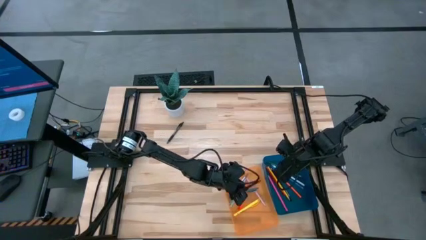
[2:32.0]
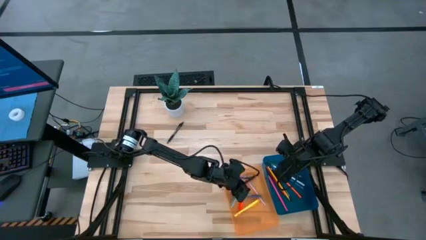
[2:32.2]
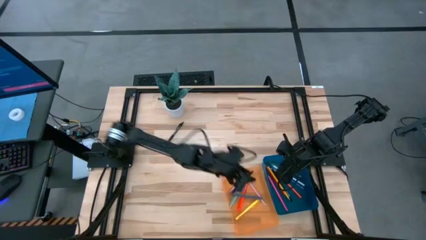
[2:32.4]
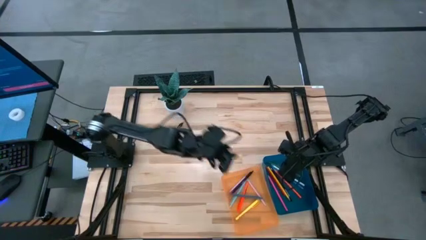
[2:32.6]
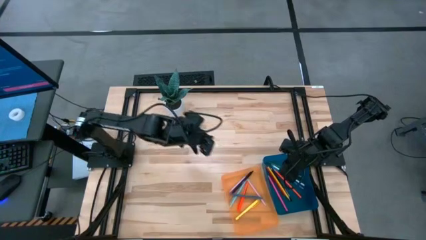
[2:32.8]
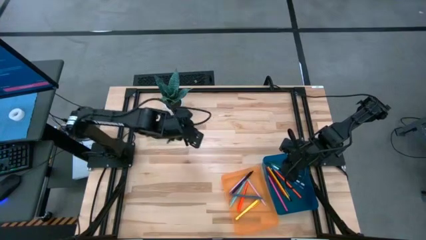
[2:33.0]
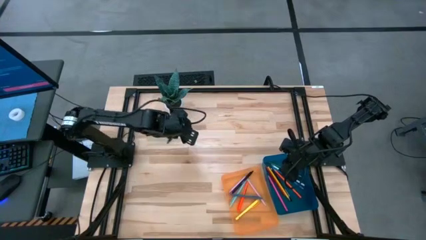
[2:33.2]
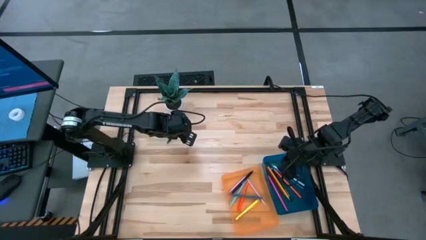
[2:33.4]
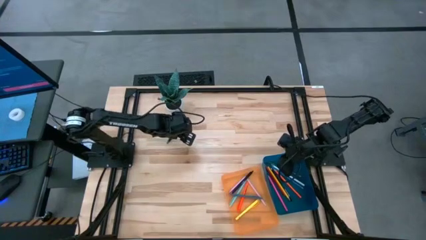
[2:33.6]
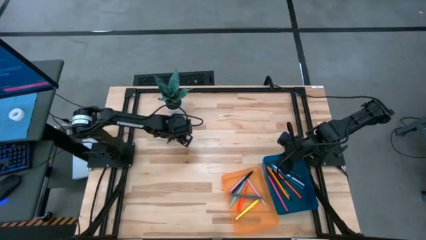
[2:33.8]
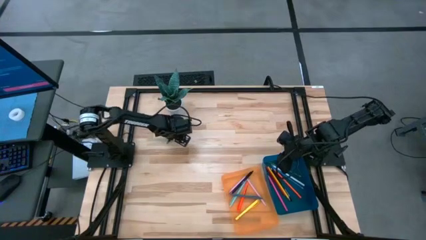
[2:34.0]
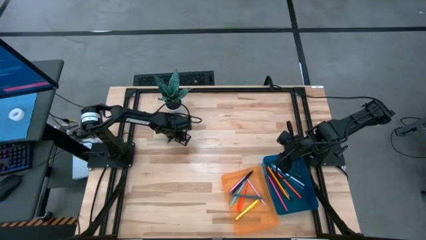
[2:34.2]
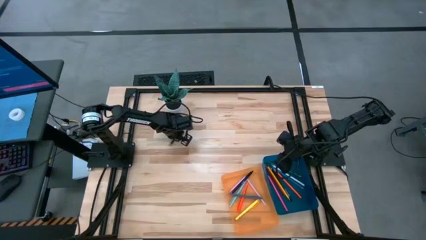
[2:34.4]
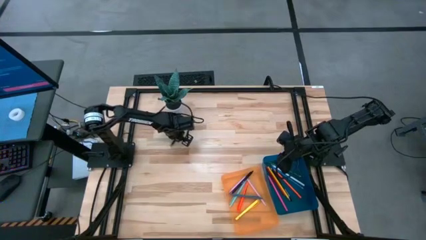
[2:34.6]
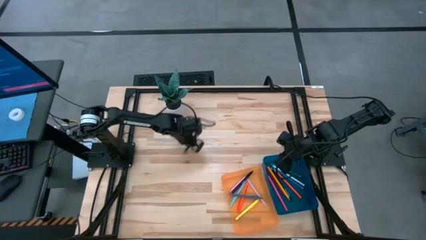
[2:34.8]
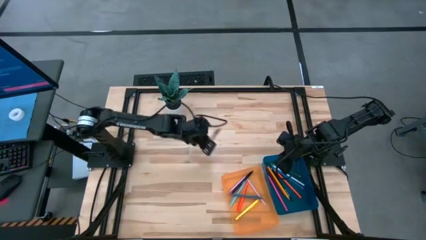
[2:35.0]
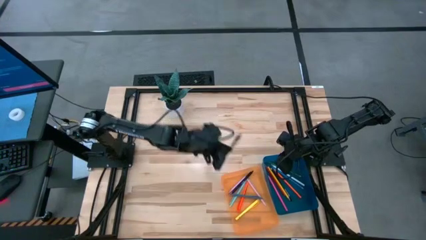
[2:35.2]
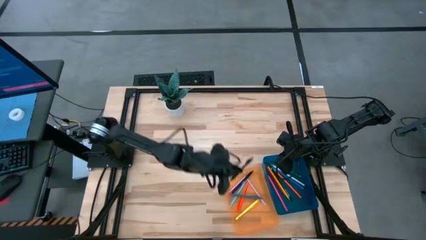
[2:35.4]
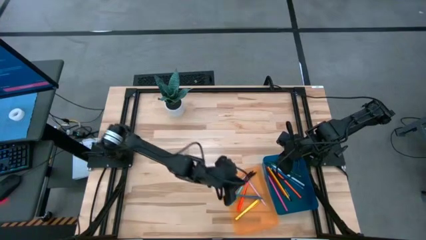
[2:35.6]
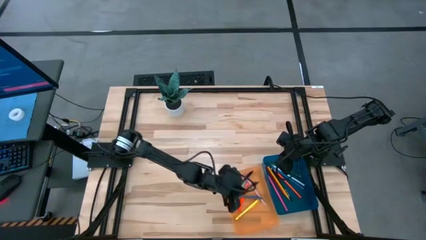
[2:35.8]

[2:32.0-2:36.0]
Task: Sort pens & pencils
Put the transparent black pen into the orange bin

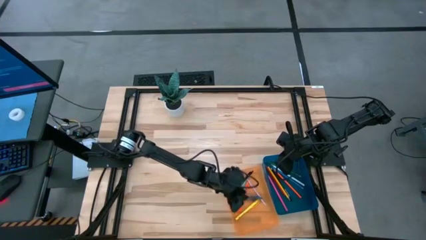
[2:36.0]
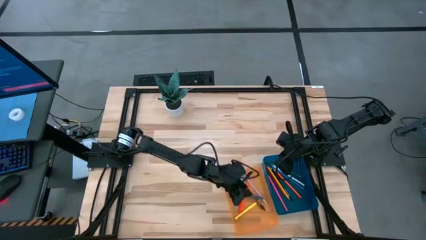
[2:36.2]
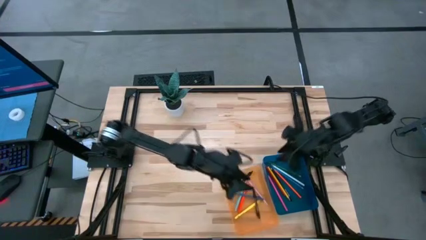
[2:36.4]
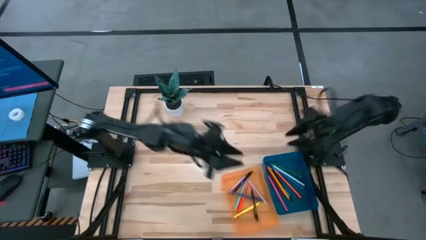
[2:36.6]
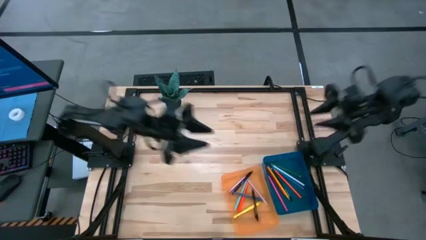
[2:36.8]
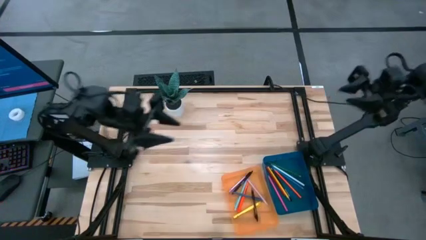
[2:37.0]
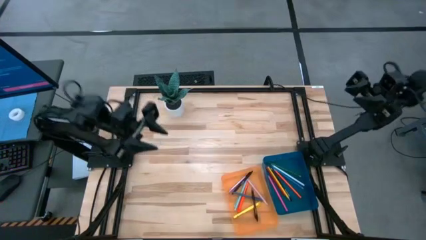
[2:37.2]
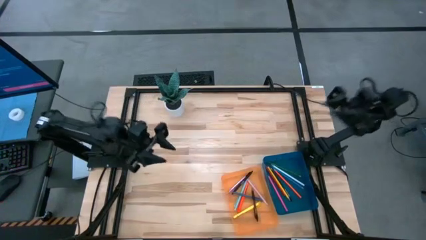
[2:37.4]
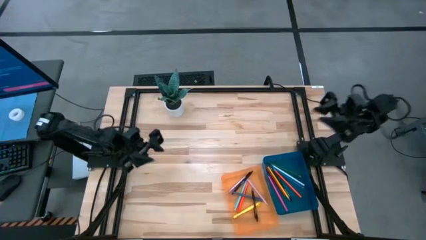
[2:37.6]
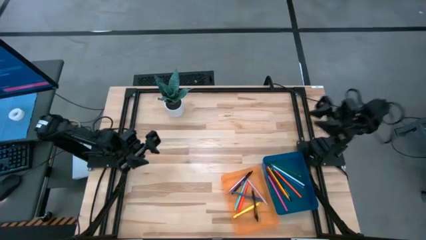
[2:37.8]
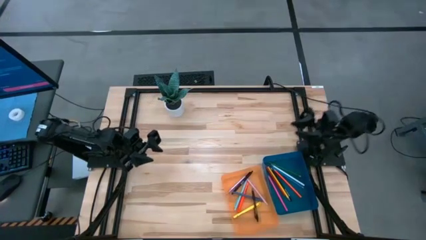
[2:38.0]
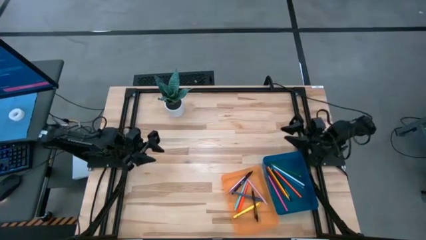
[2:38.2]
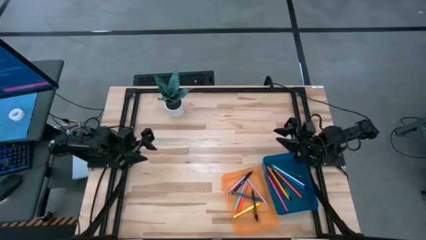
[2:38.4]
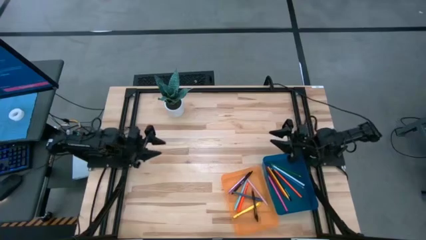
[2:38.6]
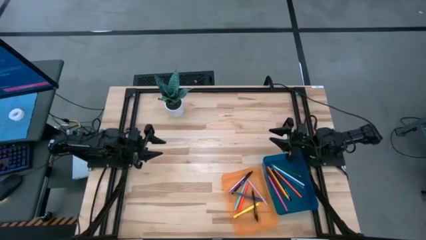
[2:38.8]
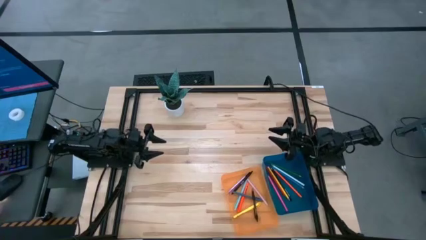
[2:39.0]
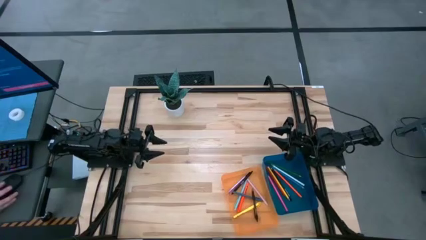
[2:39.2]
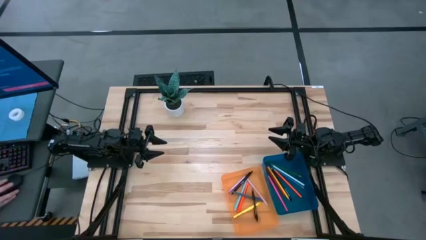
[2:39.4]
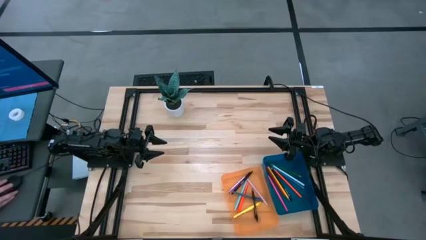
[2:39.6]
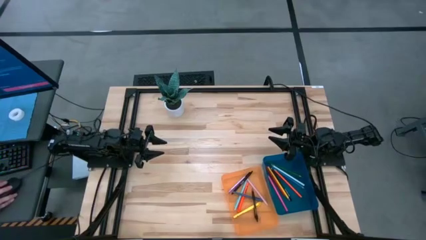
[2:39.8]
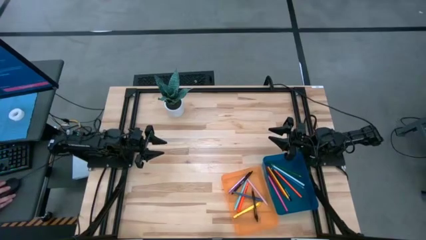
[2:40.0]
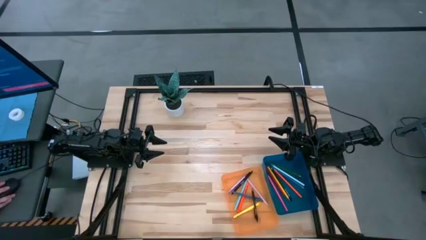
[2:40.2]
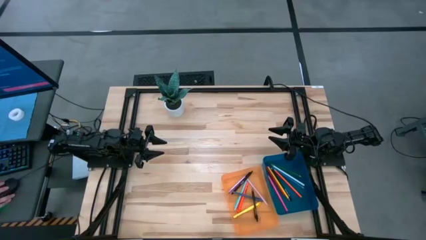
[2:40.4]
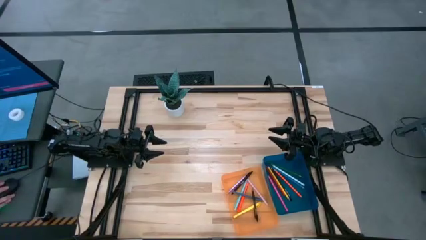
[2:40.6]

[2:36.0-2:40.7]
Return to Home Position

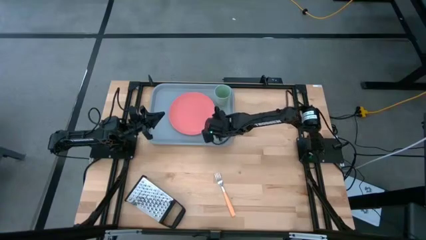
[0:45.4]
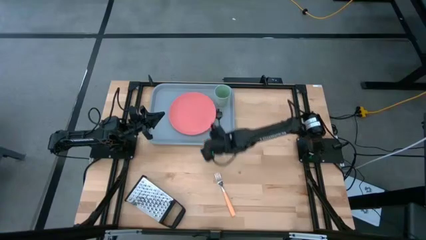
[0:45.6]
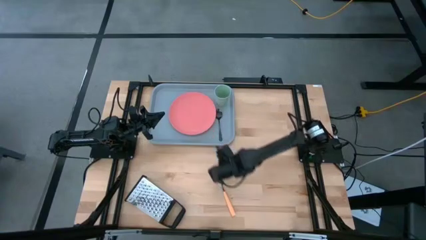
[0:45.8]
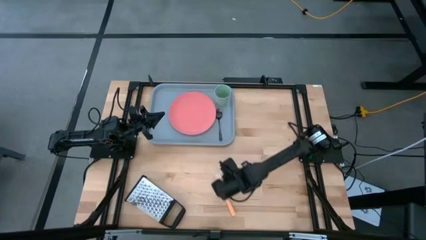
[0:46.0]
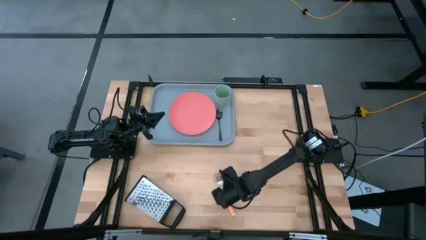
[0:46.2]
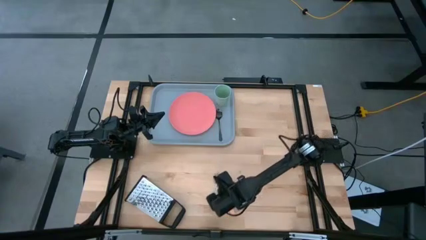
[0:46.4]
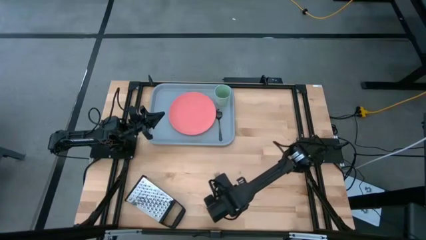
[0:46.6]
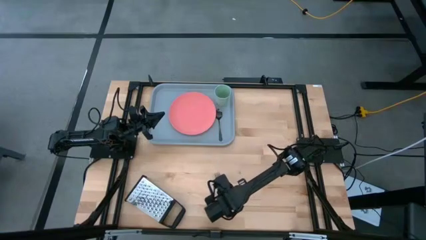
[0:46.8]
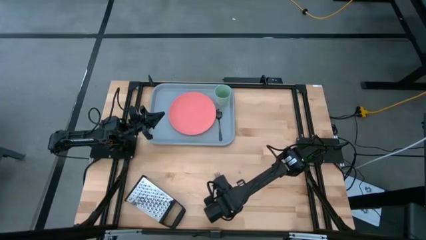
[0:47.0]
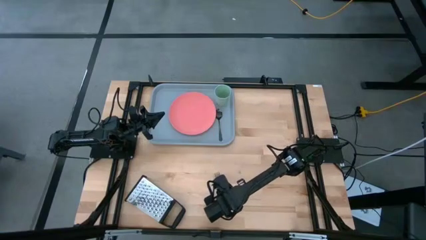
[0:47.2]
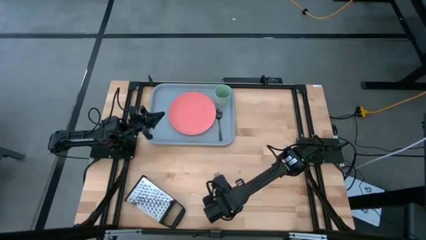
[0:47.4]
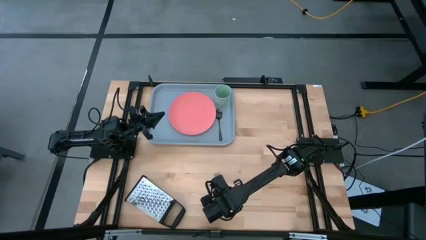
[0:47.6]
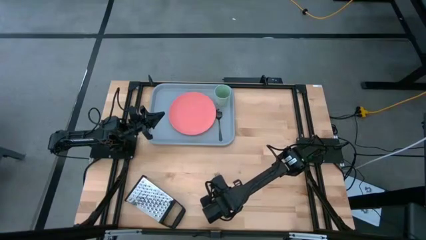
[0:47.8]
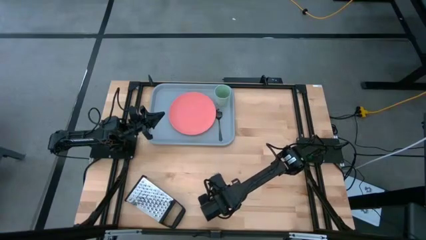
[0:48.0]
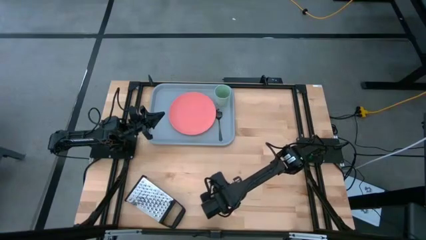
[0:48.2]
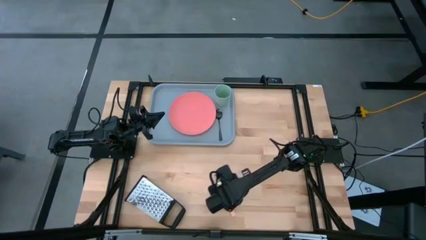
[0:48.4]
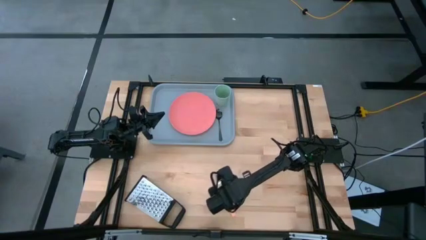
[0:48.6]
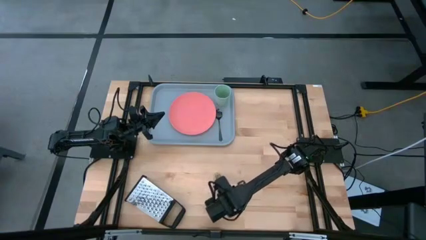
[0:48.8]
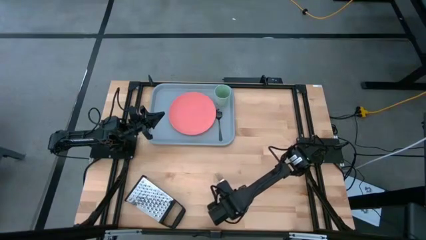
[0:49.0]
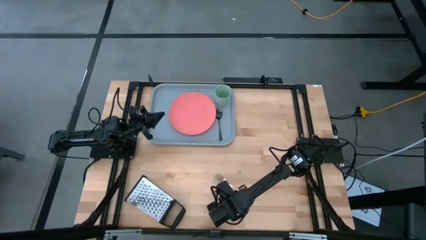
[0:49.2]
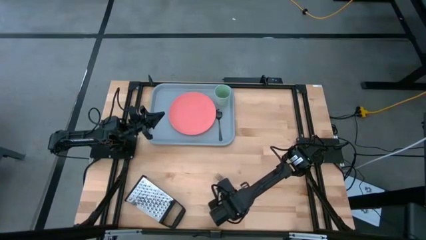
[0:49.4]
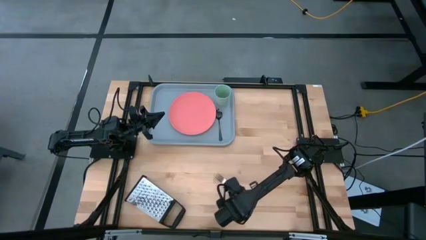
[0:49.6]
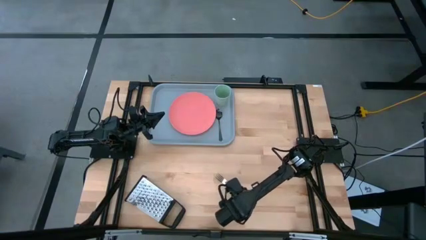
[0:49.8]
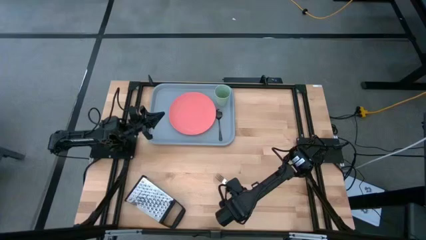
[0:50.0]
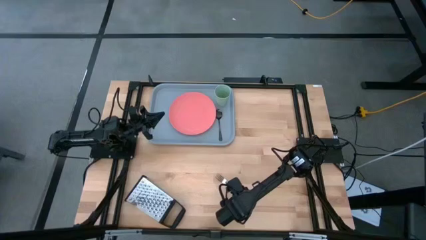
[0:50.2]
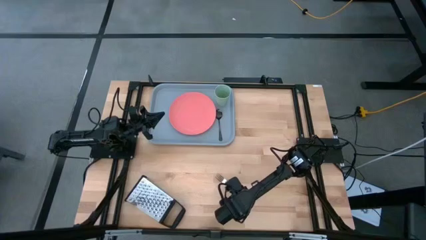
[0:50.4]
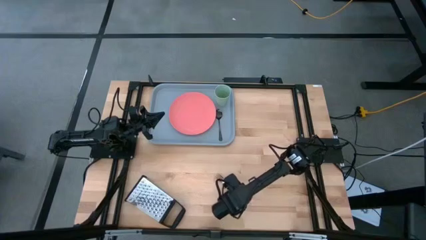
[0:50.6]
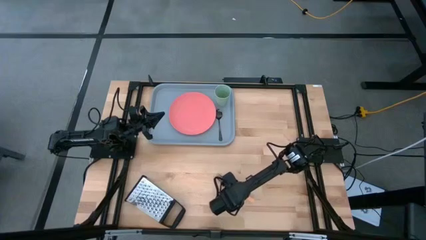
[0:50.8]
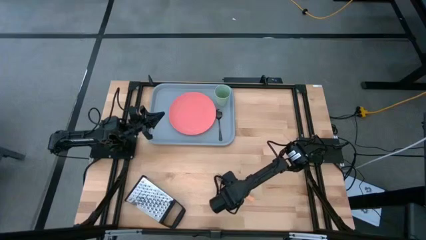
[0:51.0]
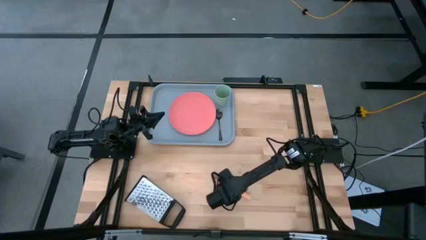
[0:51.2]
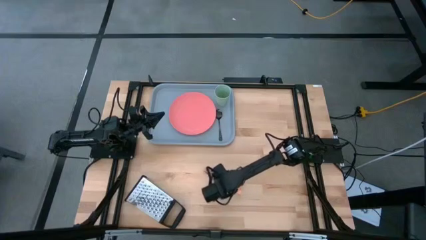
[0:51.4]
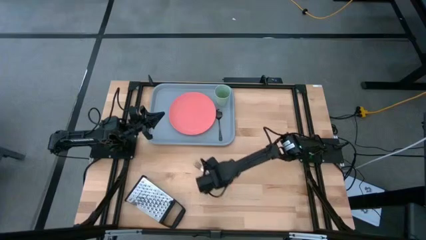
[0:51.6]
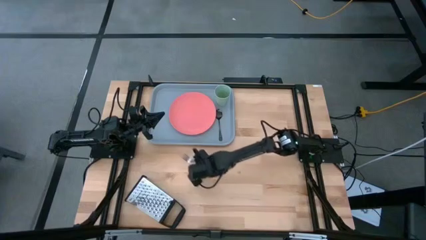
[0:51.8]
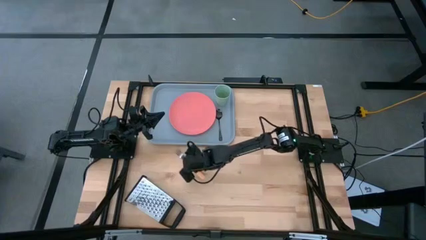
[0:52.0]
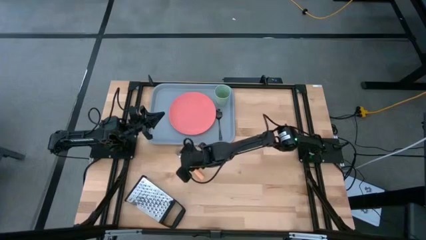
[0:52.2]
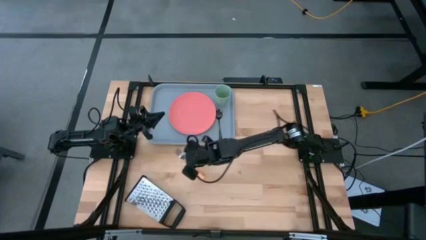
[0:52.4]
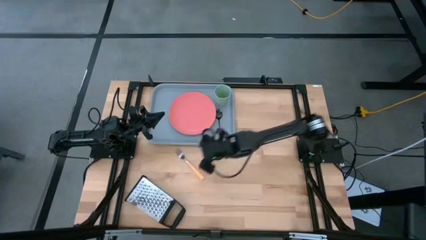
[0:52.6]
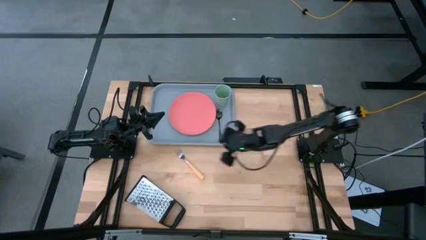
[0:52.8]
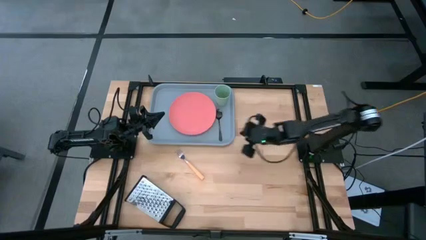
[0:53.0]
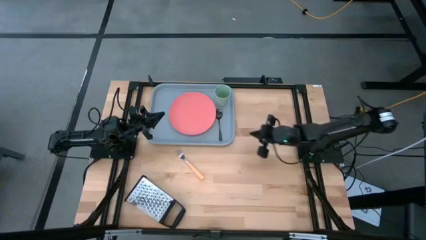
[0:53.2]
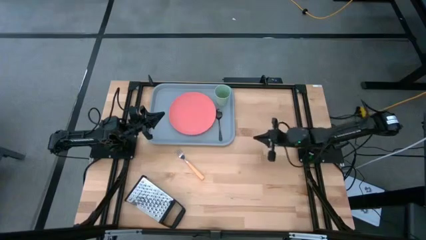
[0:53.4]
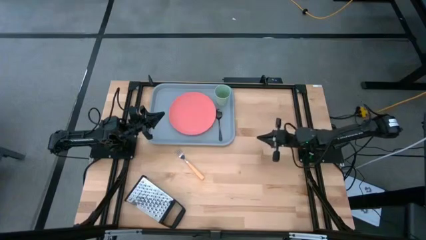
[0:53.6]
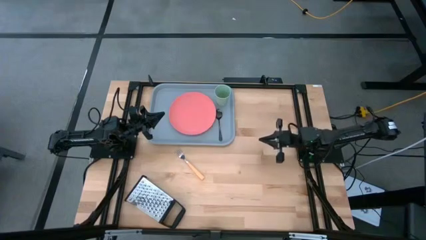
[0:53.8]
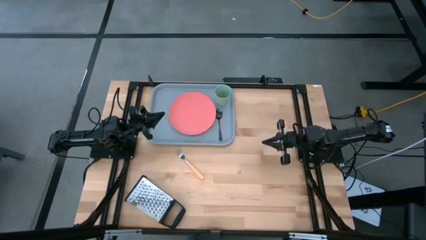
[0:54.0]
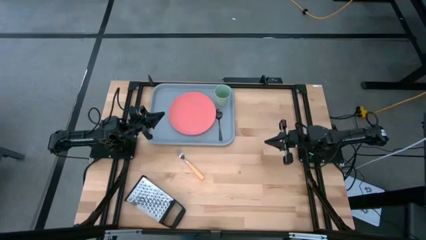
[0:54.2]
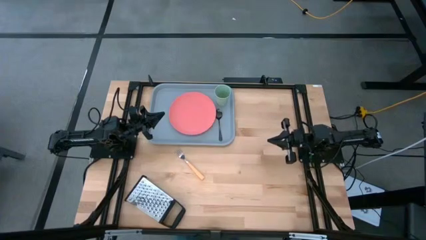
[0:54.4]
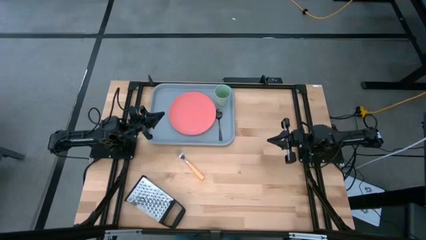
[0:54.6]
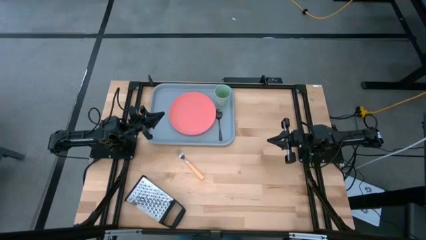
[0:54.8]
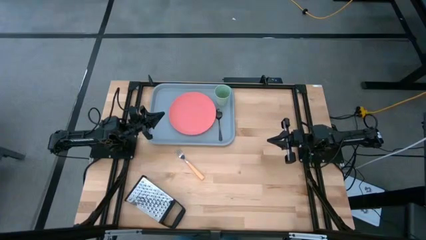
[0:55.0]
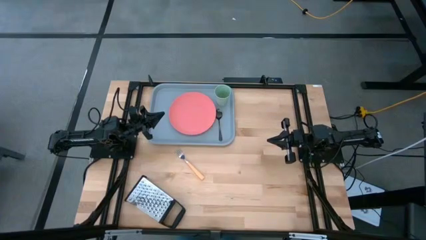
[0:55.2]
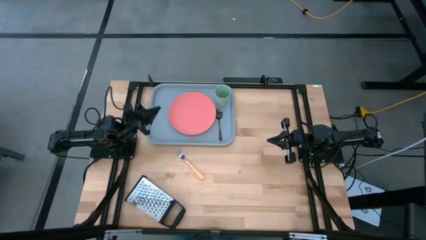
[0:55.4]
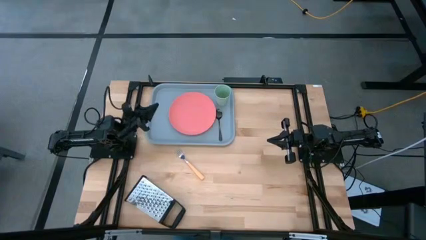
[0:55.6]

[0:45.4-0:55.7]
Task: Pick and place plate/cup/fork/spoon on tray
Put the orange fork on the gray serving tray beside the pink plate
